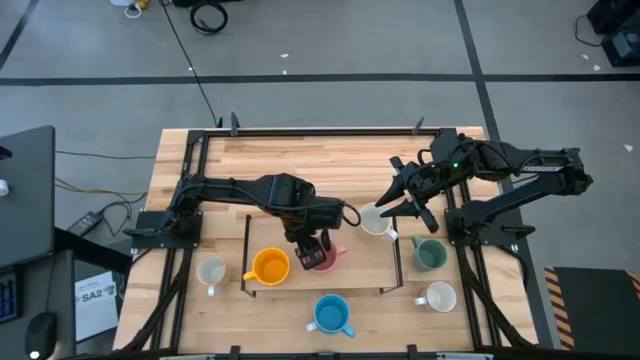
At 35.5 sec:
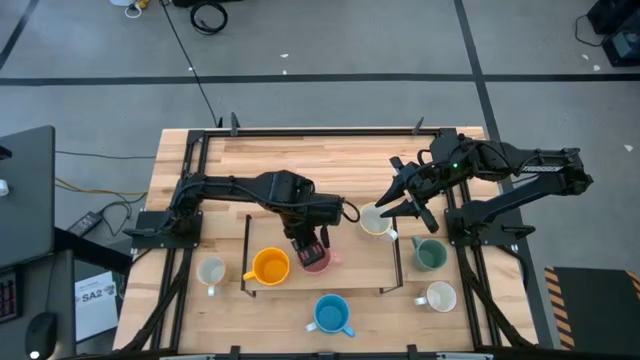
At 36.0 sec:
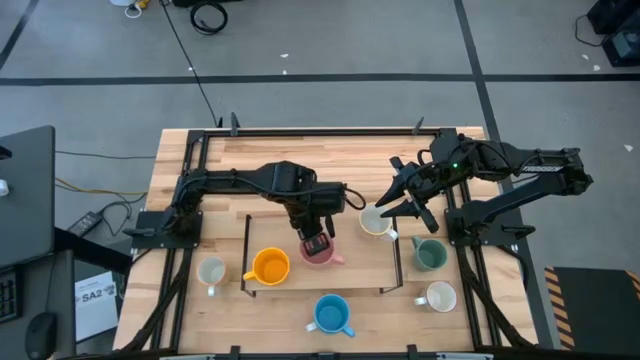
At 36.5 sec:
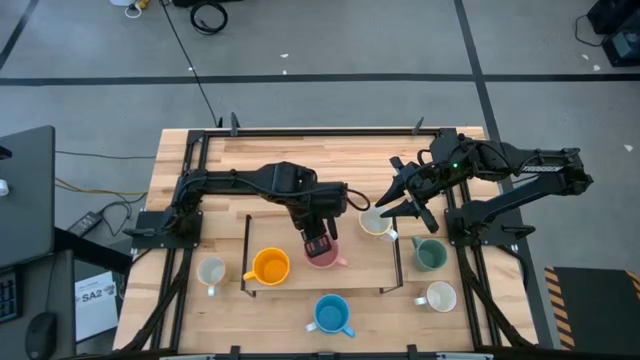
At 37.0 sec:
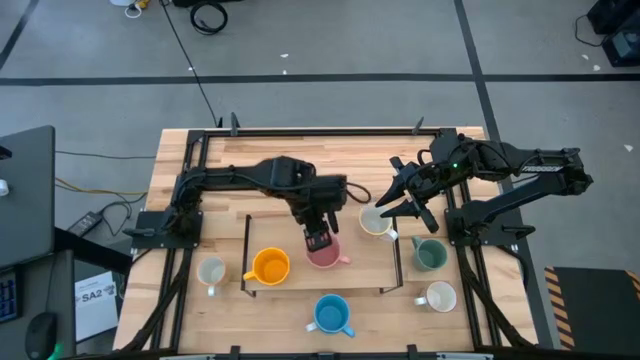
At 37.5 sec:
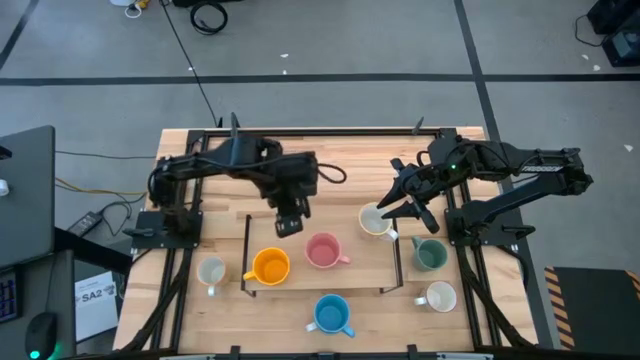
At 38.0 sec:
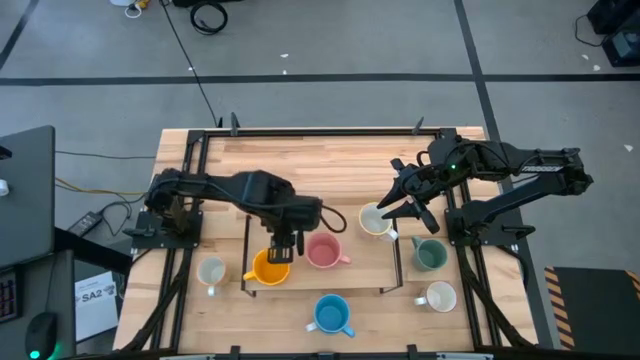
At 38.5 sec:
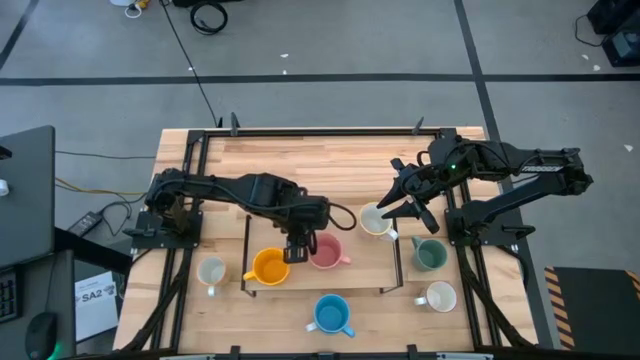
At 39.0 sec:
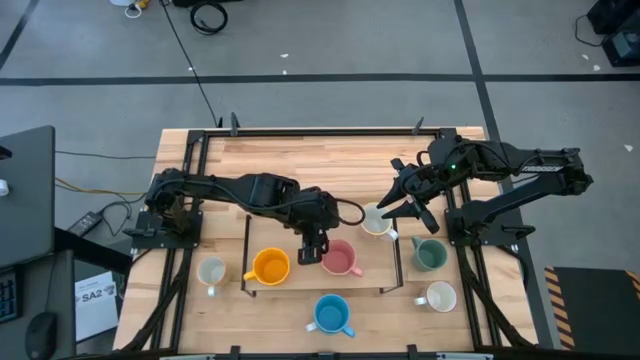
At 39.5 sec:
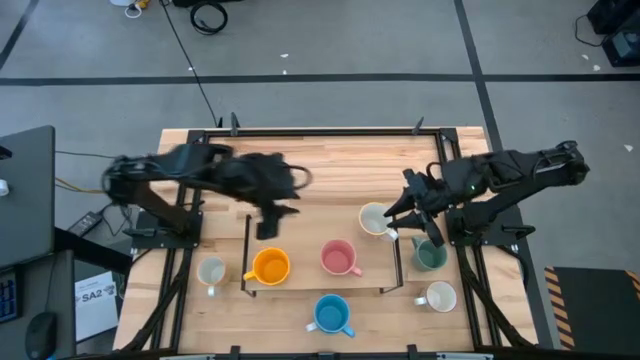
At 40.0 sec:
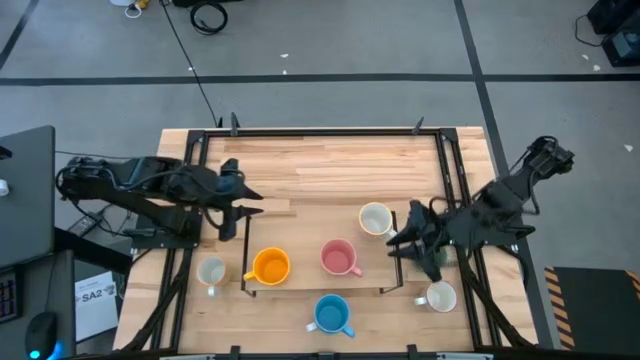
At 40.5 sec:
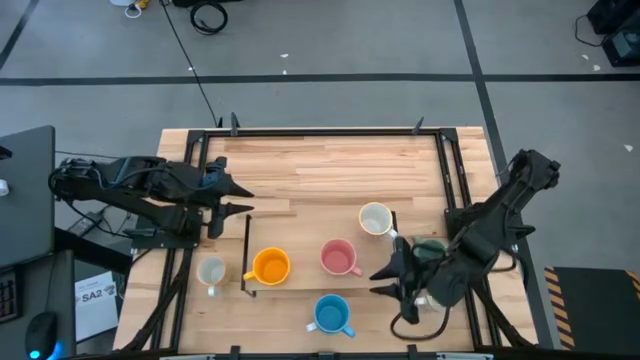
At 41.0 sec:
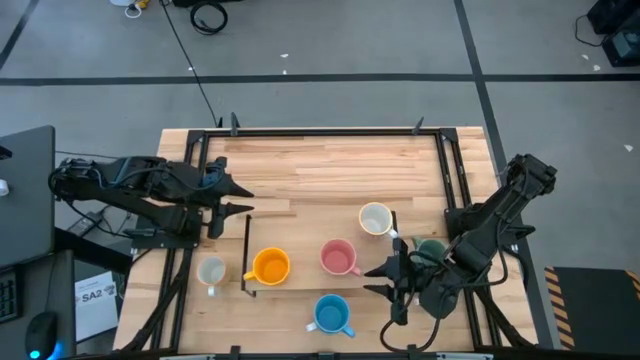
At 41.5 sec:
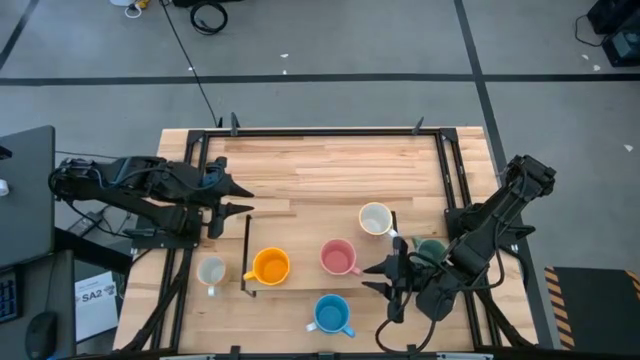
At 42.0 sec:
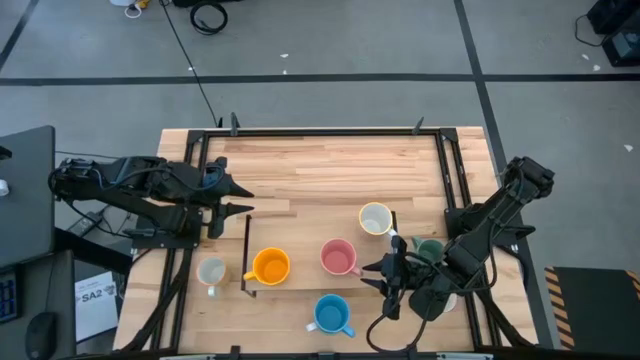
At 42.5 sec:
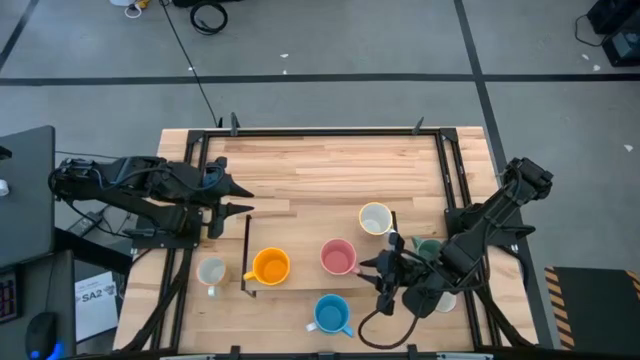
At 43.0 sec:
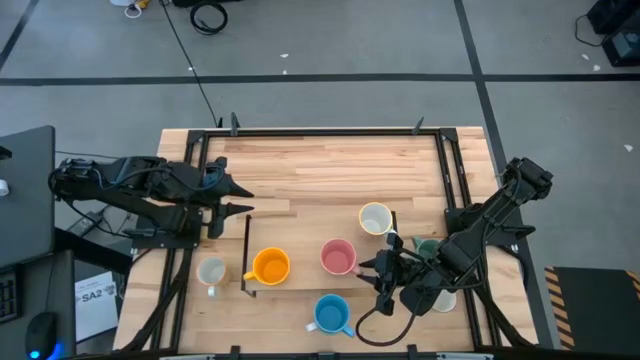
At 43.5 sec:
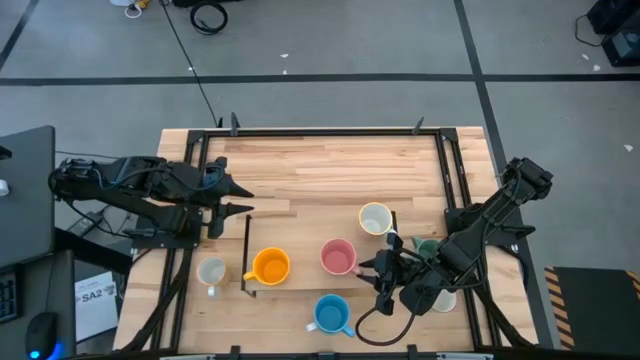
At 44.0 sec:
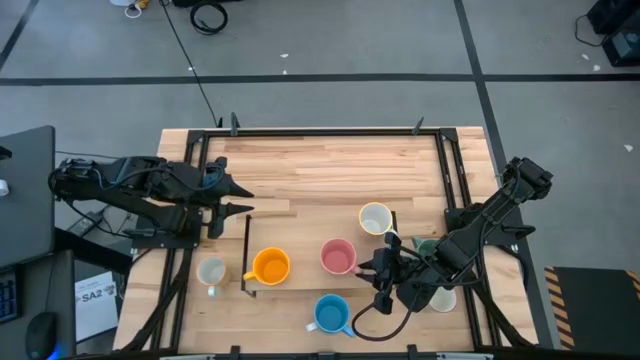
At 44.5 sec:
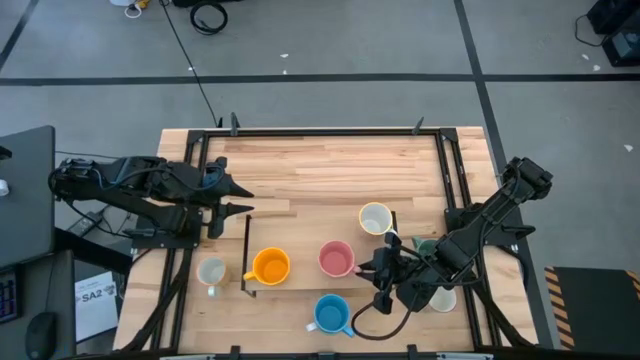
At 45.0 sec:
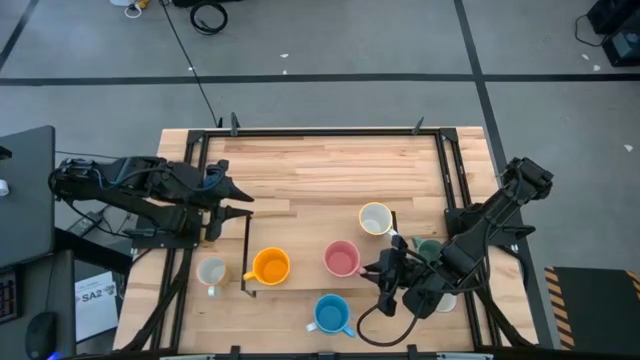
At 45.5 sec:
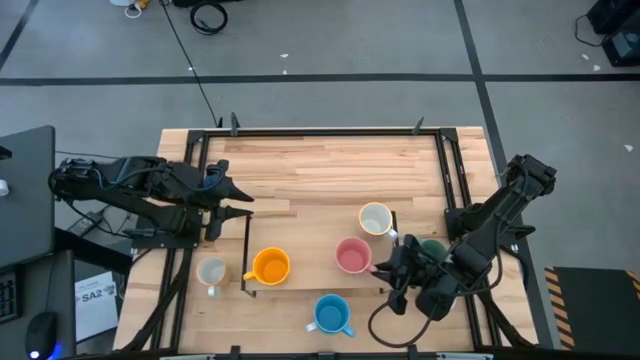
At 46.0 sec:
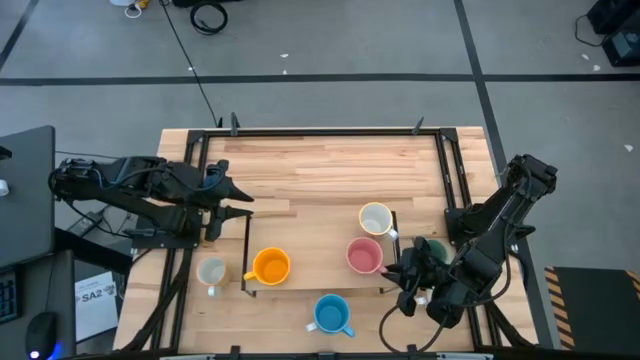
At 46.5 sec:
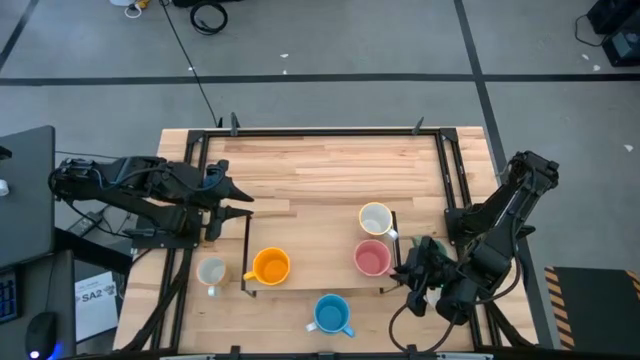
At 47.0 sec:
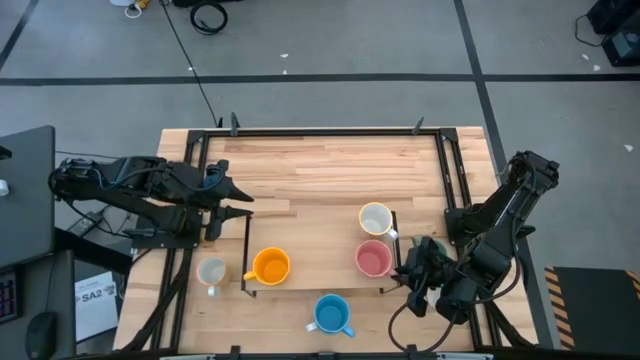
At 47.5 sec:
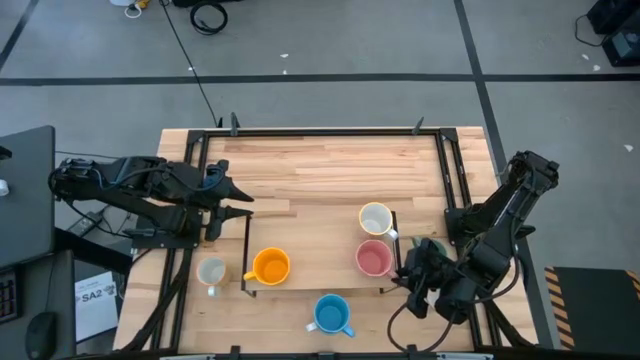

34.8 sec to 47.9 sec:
Task: Place coffee mugs
Put the pink mug on the shelf

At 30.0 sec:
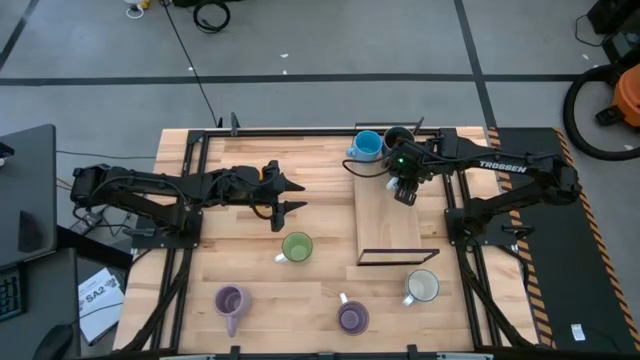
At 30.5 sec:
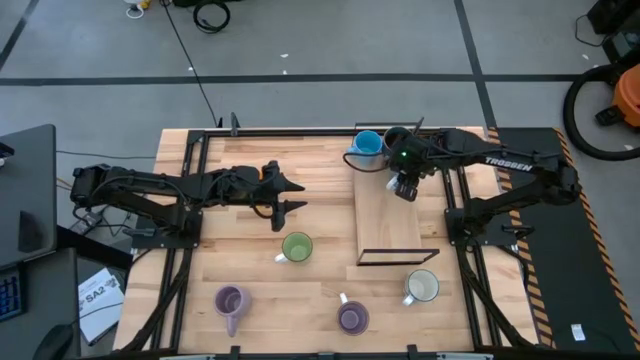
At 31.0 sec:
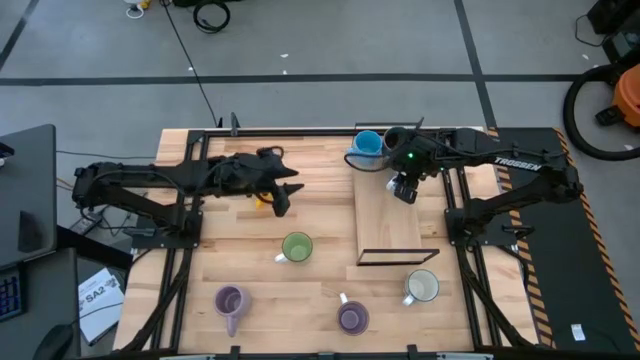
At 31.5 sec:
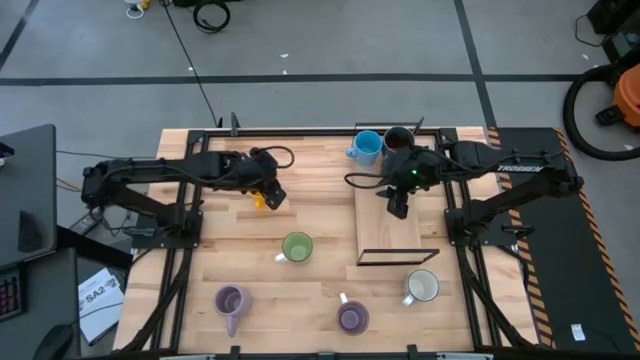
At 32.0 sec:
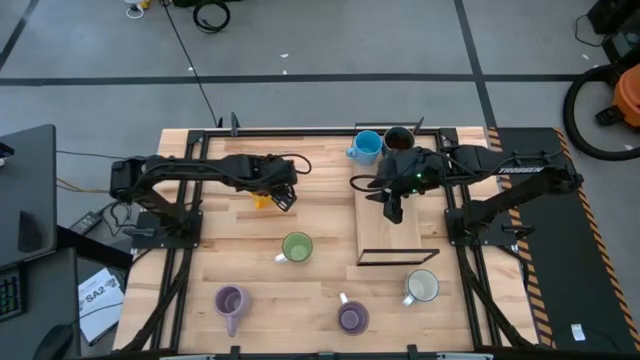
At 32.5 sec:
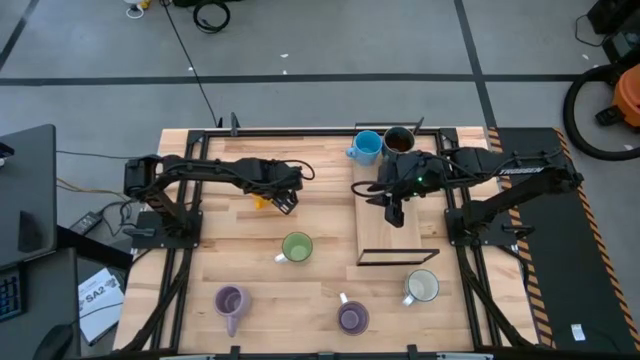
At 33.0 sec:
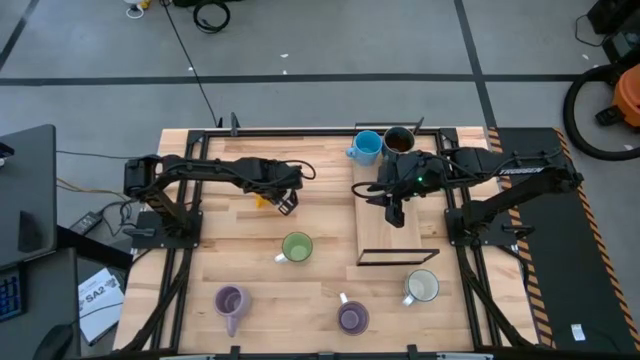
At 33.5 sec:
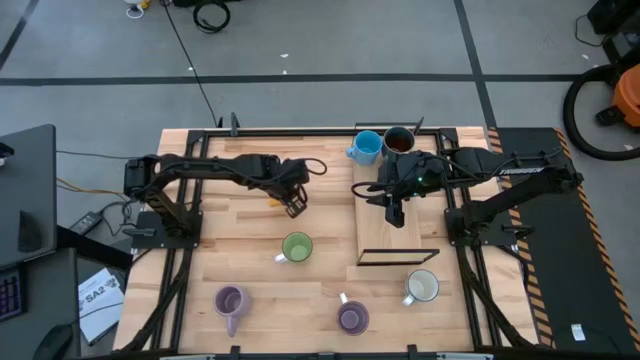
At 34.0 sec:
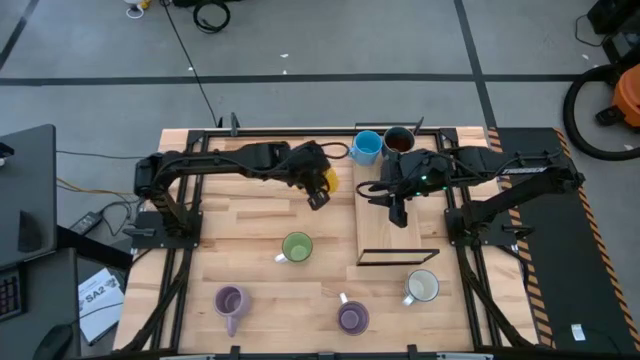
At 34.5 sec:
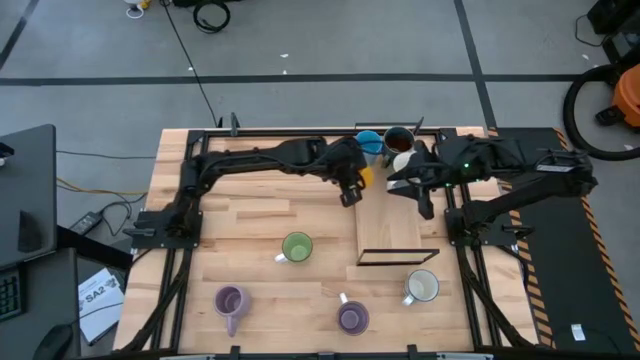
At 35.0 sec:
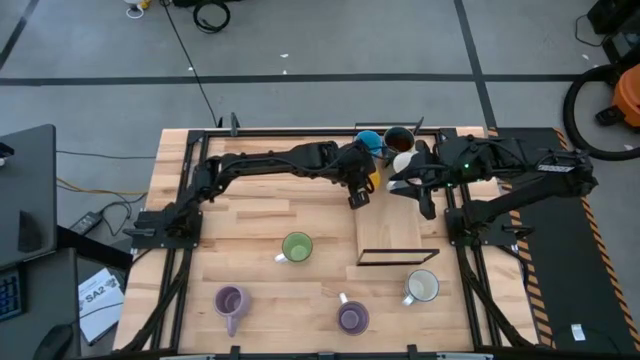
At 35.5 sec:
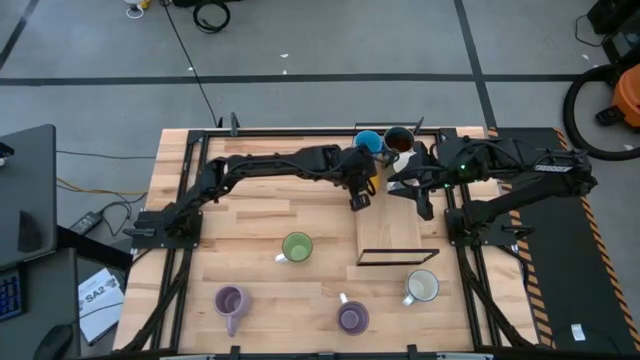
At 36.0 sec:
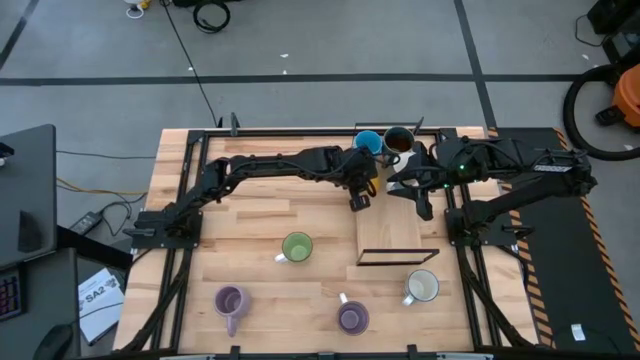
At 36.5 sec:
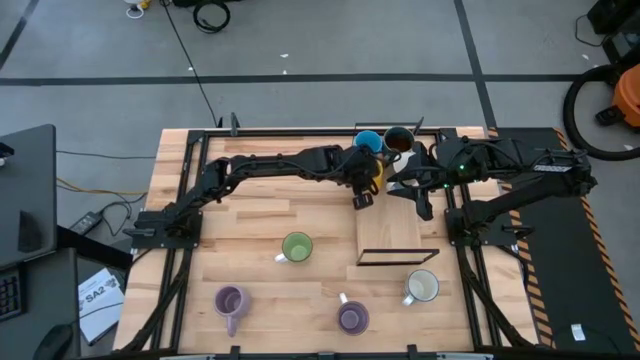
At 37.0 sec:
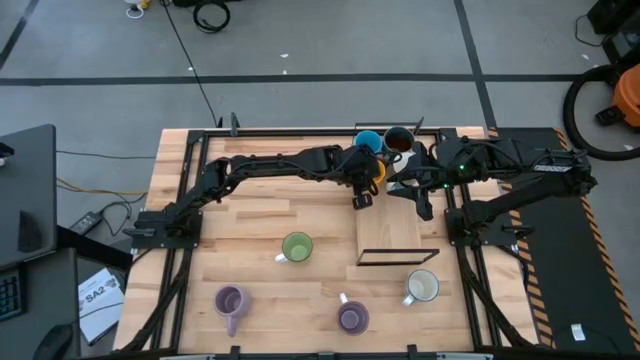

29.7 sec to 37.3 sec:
Task: Place coffee mugs
Put the yellow mug on the shelf

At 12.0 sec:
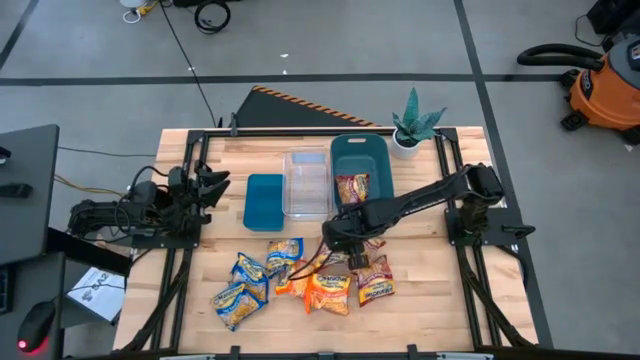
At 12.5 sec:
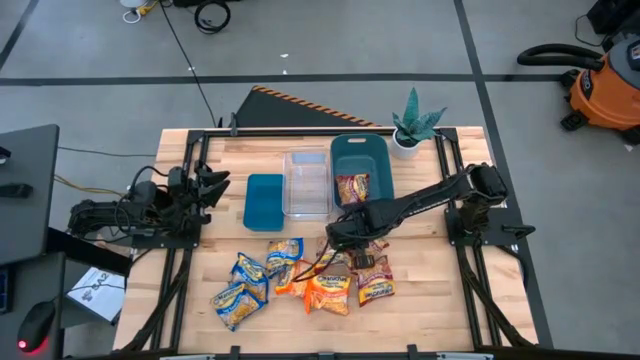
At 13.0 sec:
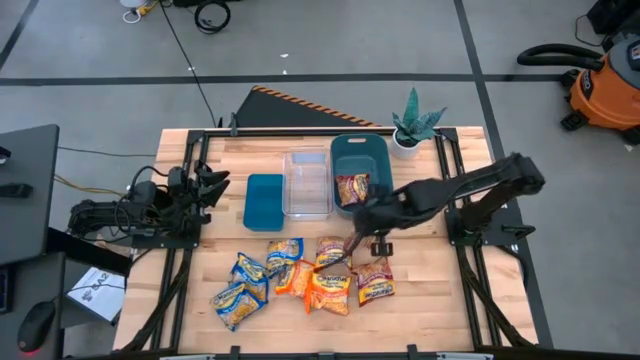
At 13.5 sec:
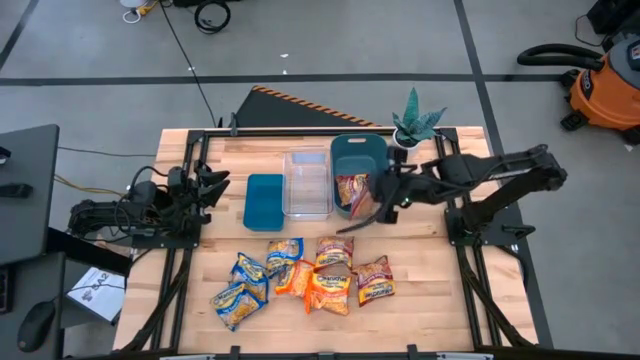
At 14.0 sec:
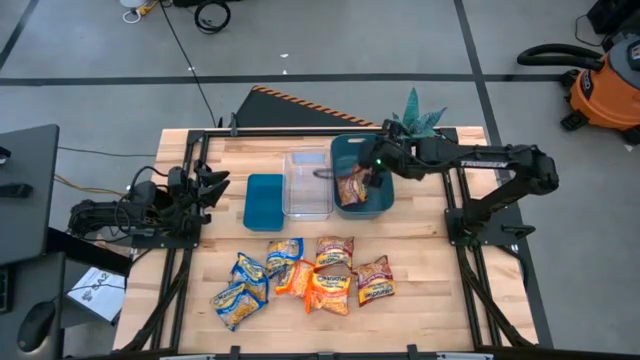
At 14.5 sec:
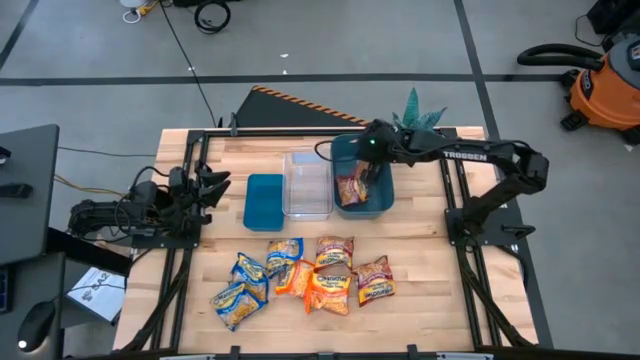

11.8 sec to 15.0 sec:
Task: Sort Maruchan noodles
Put the red noodle pack into the green bin
